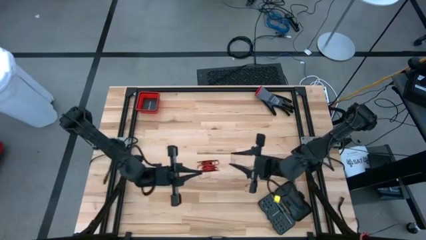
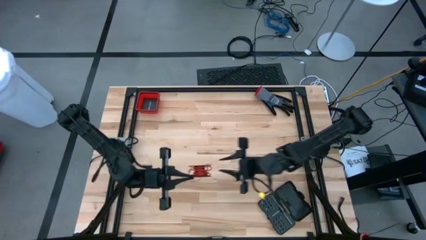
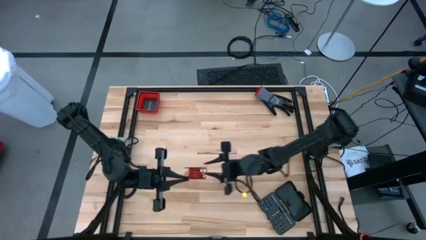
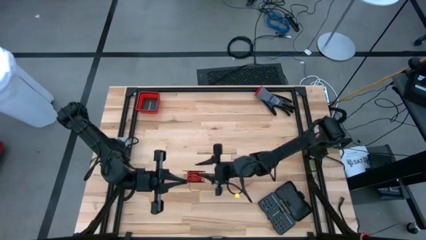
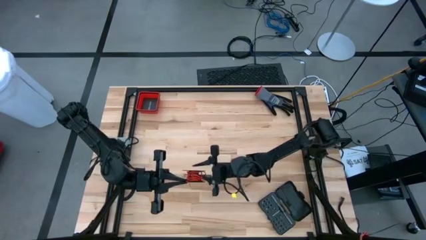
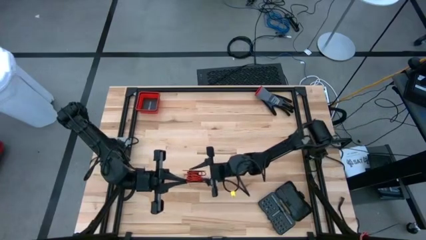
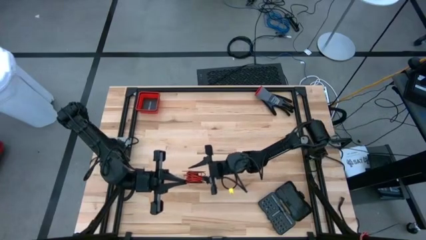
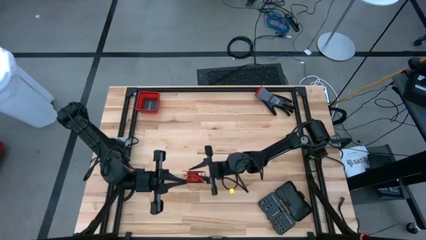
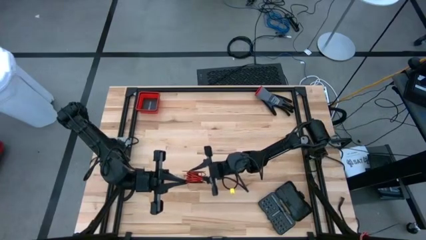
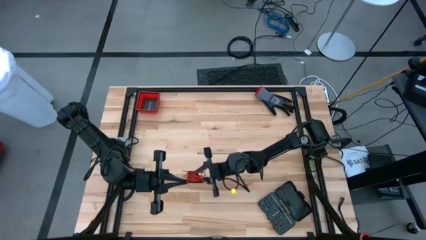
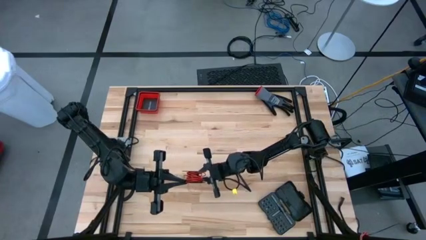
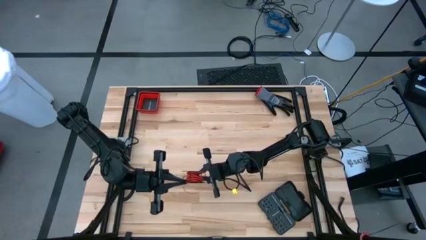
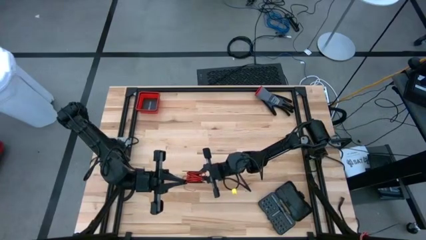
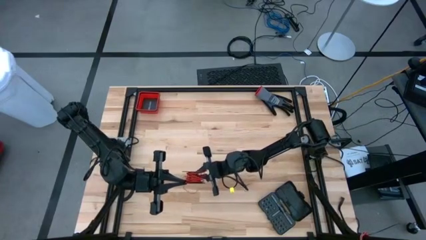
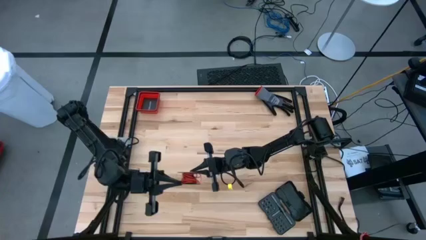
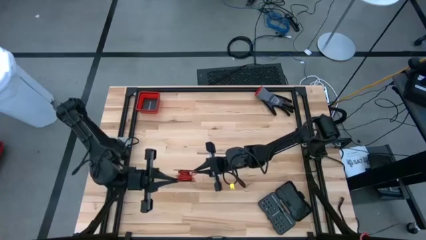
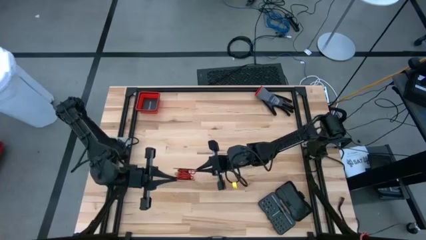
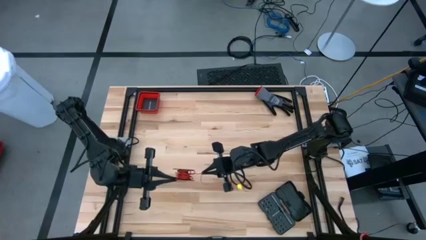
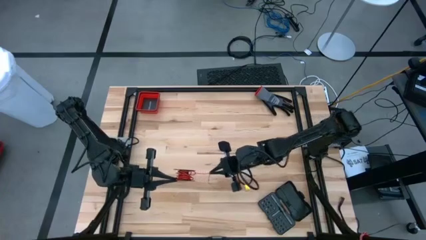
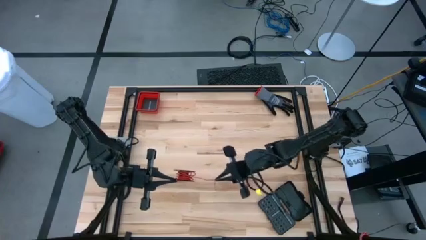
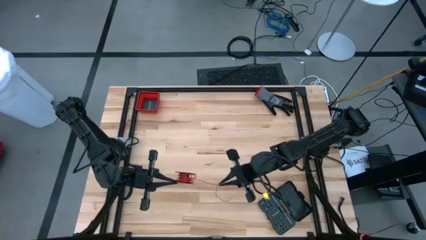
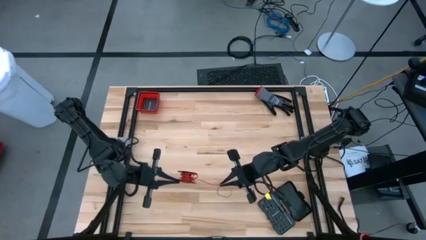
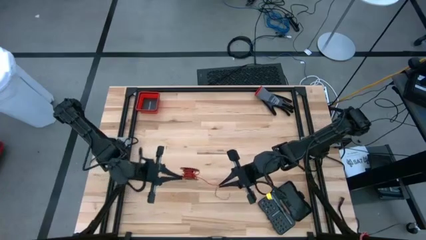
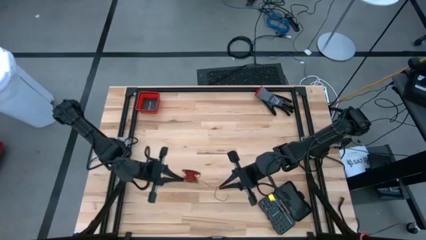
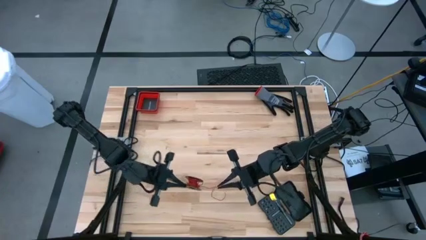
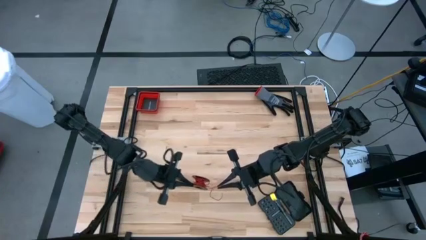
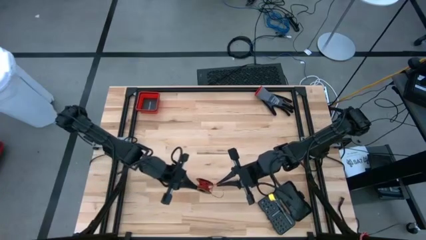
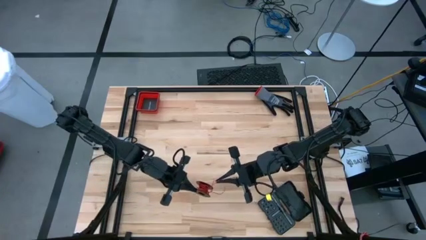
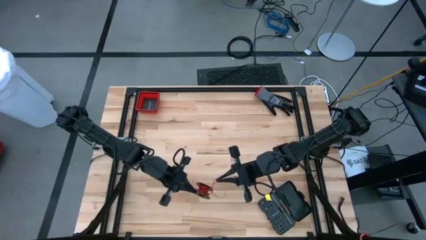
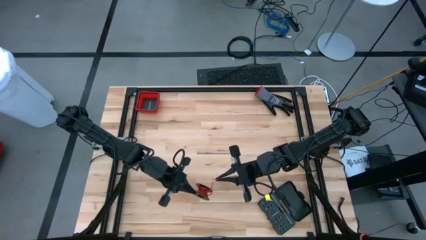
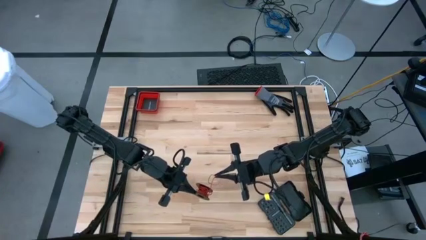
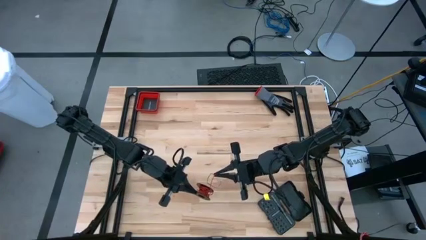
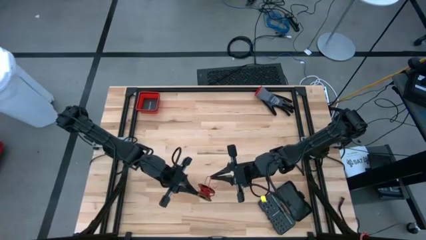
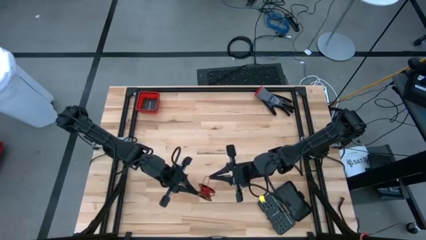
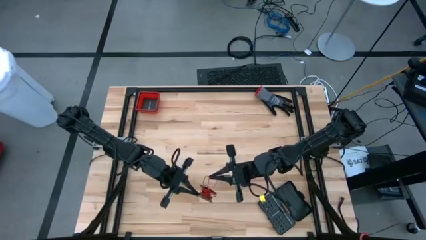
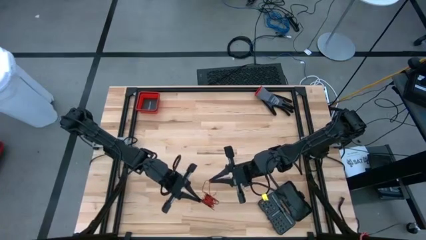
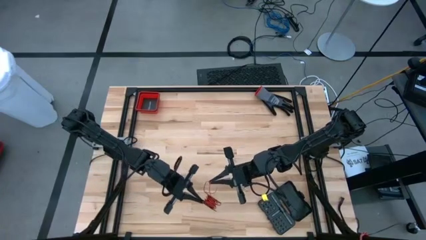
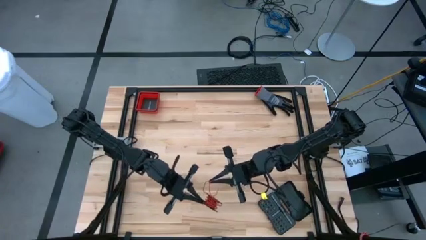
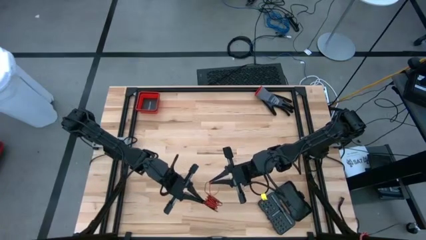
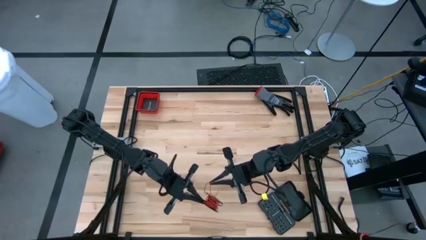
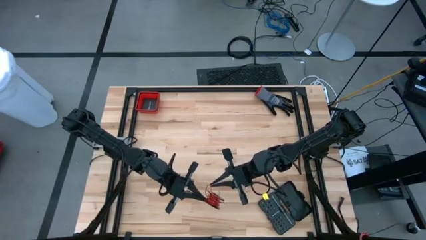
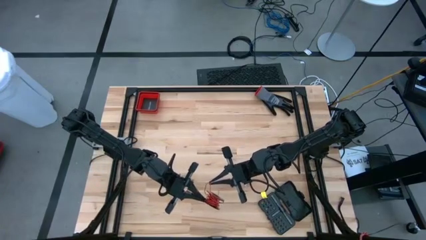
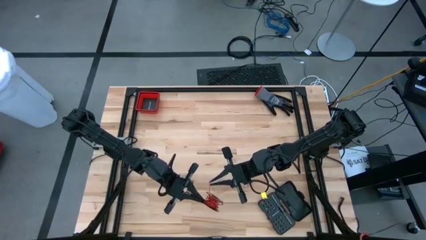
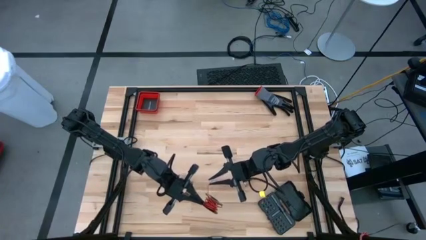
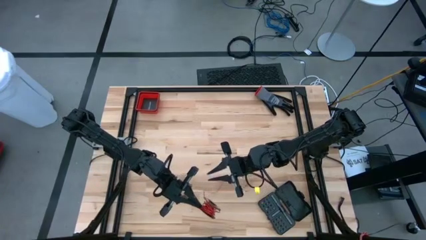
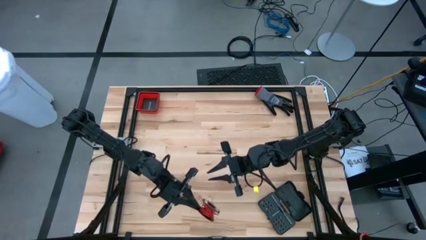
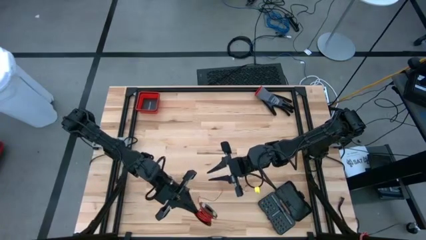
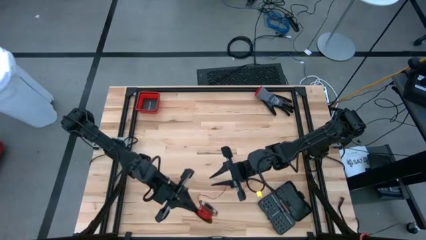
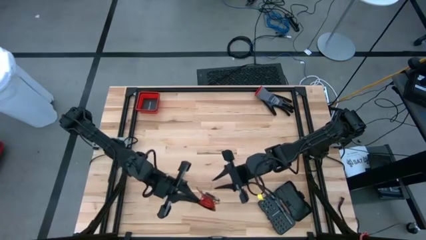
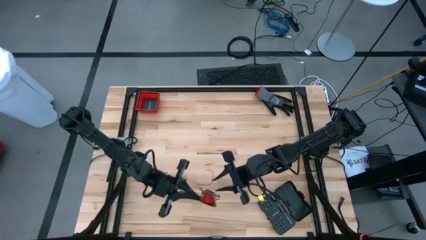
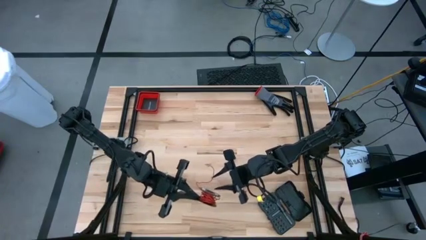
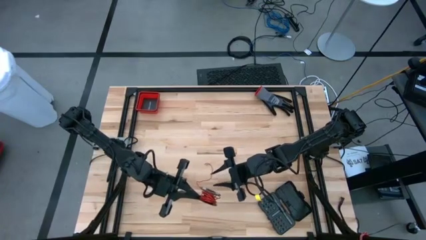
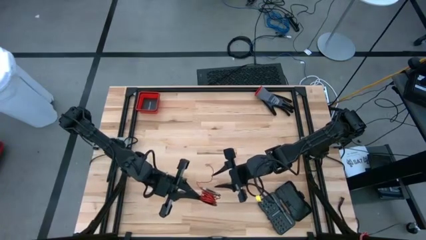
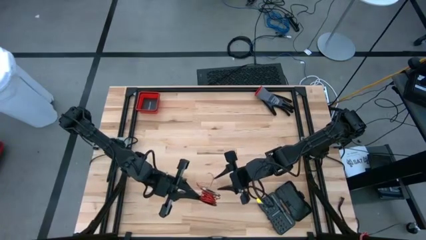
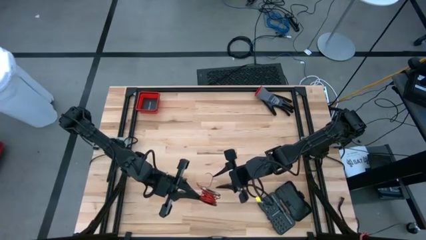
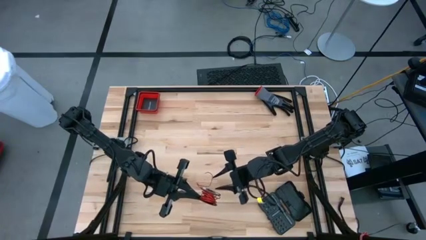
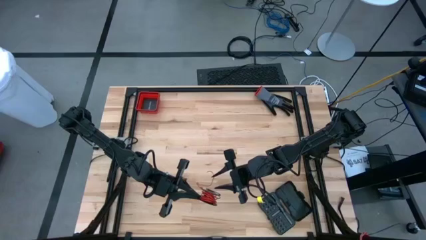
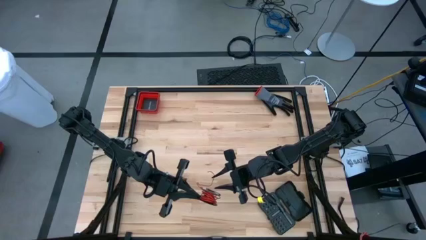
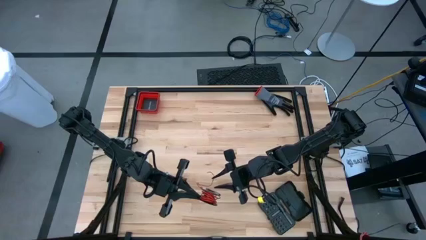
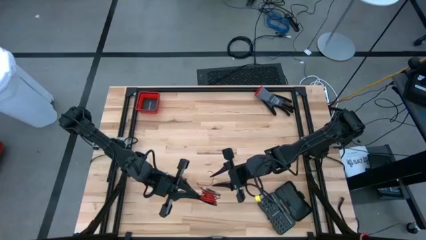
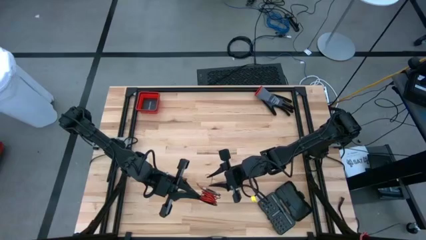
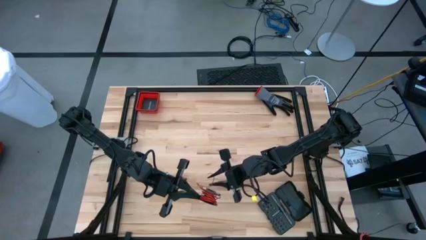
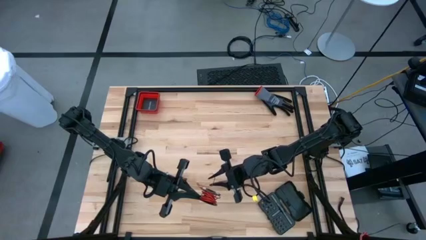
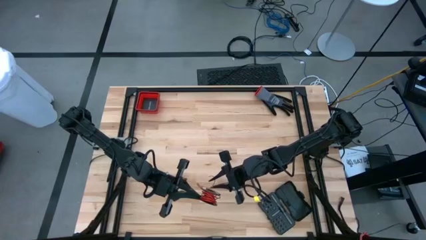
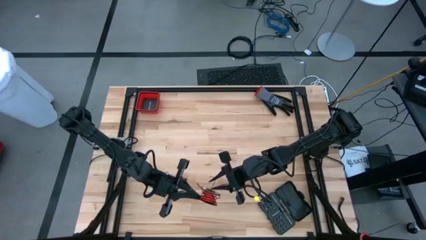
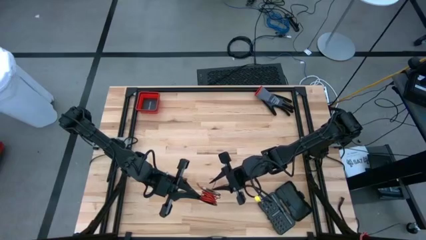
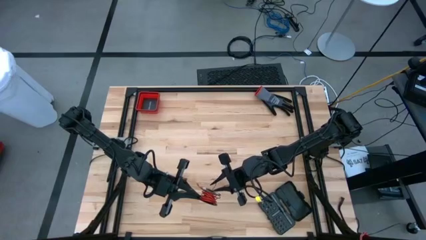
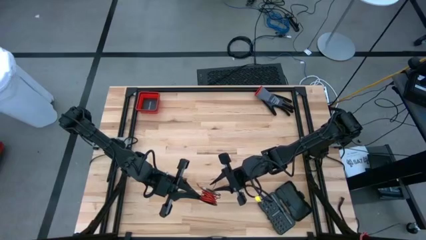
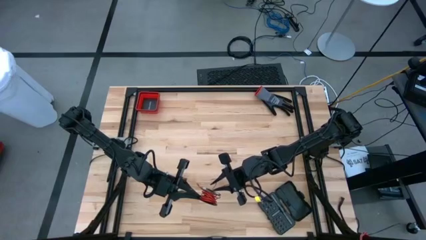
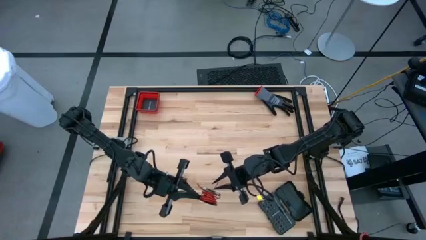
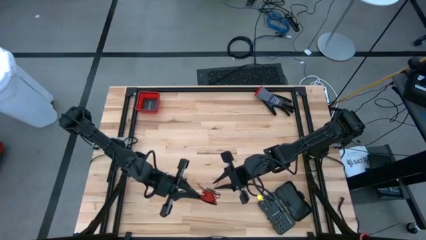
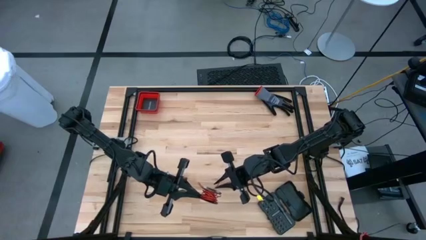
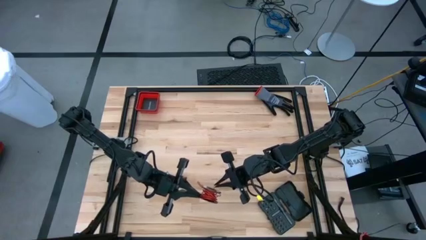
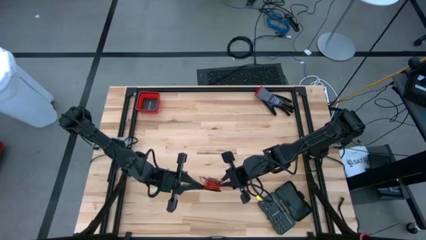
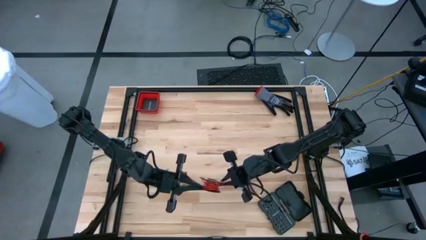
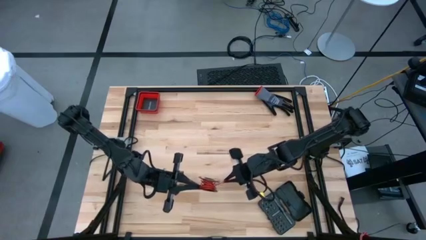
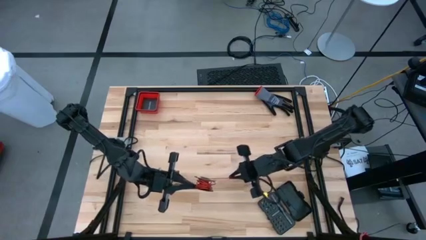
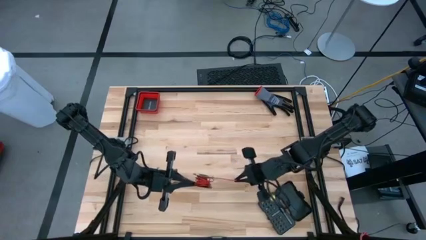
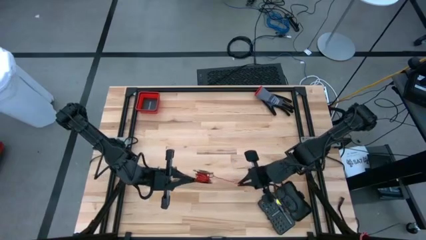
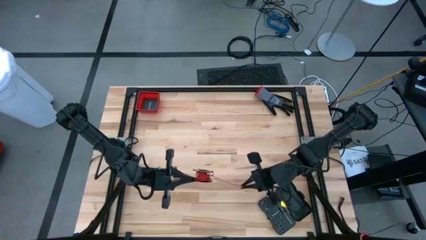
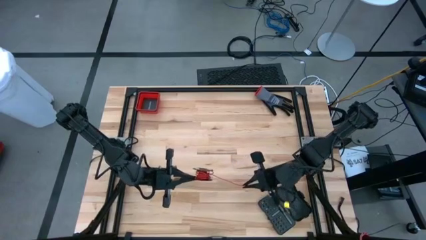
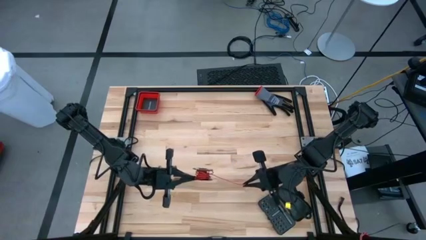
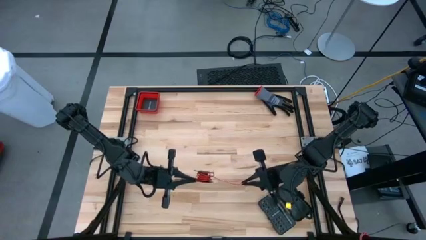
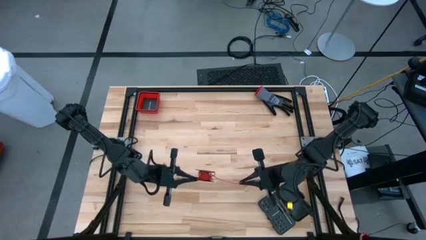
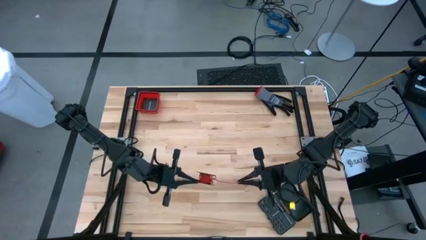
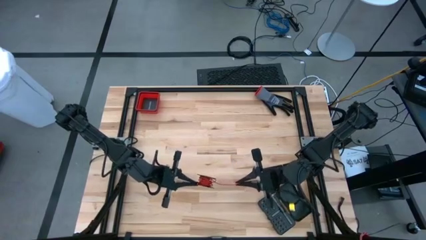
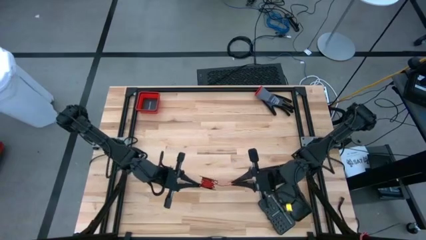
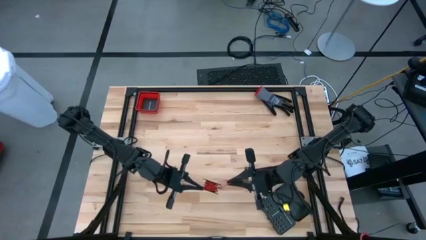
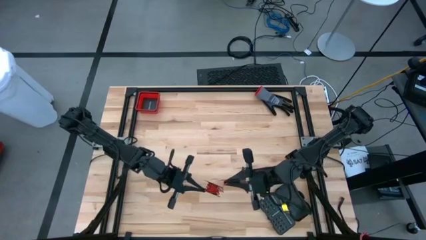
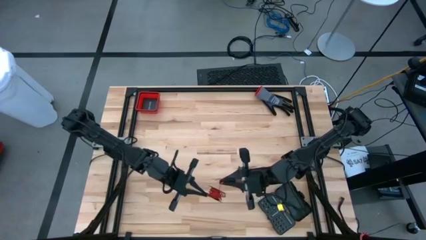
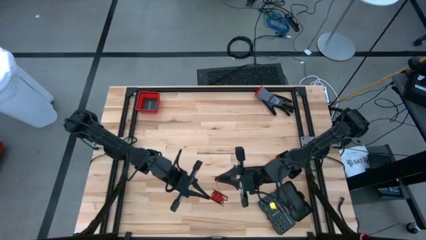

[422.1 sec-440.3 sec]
Task: Coil cords
Coil the red wire onto the spool
